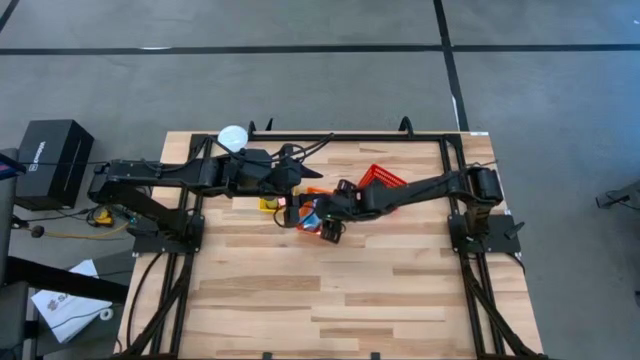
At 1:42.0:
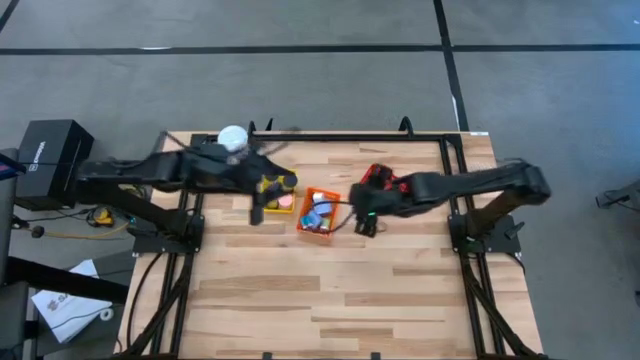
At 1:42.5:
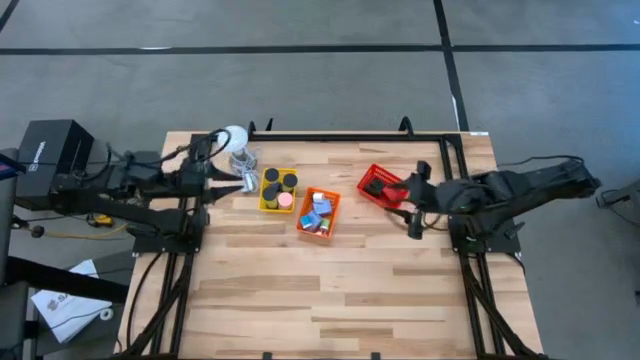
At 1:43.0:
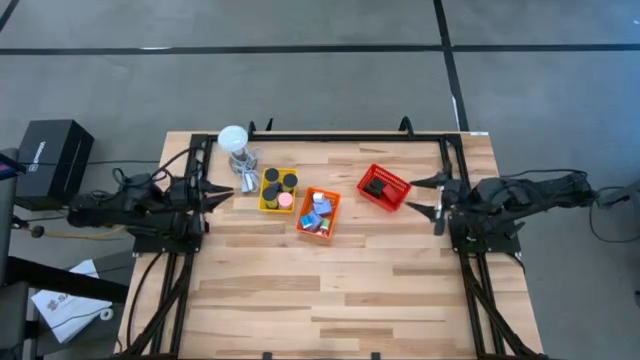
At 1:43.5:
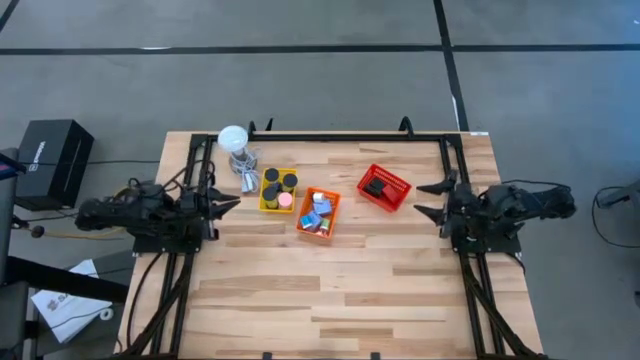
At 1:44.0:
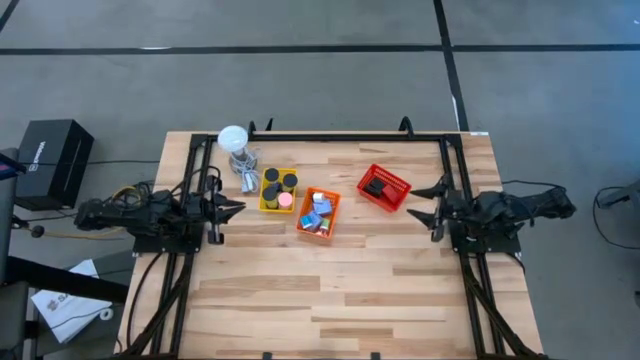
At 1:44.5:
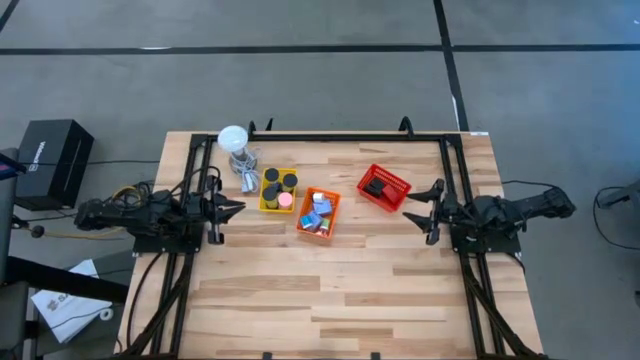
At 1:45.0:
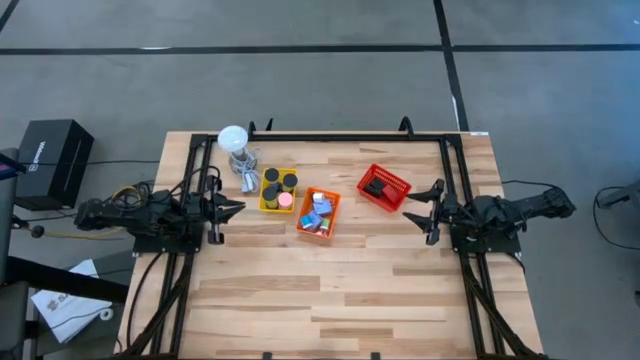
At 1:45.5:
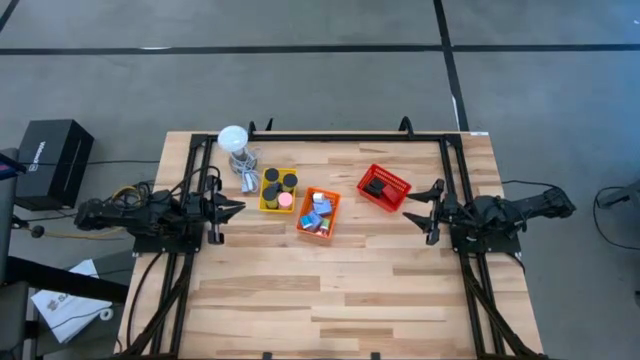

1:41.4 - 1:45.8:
Task: Pick & Place Office items
Return to Home Position

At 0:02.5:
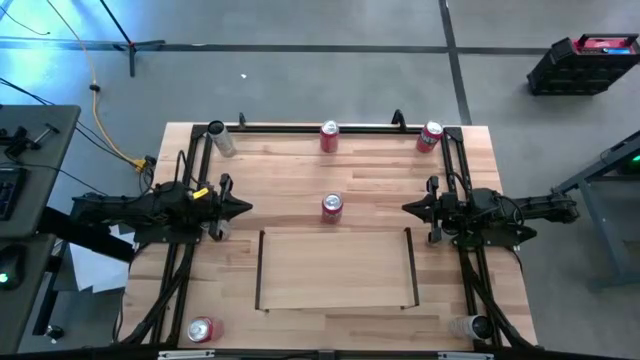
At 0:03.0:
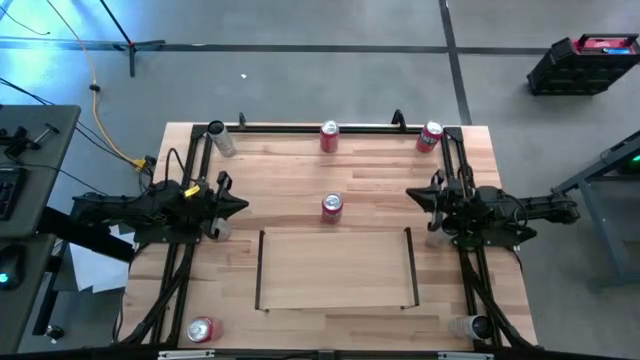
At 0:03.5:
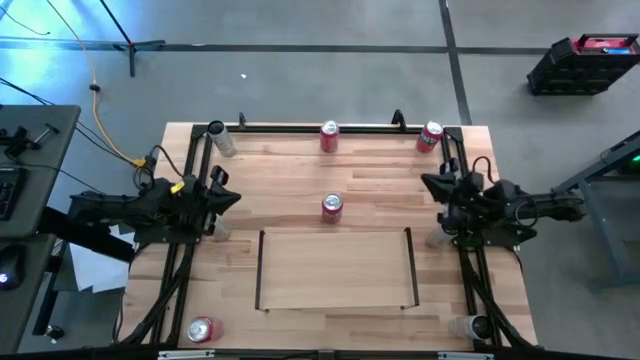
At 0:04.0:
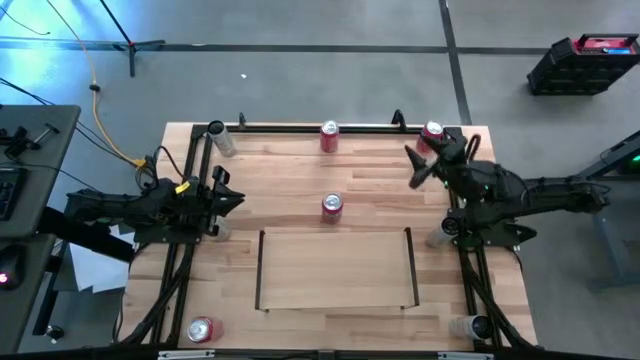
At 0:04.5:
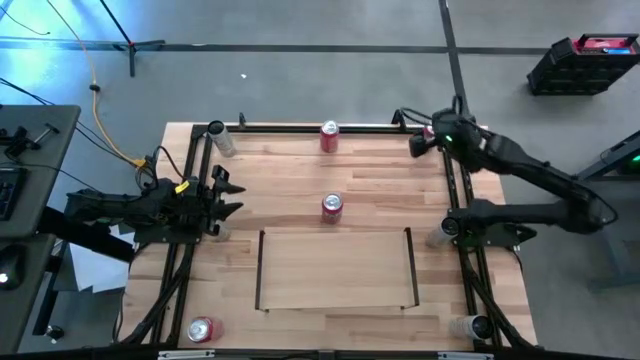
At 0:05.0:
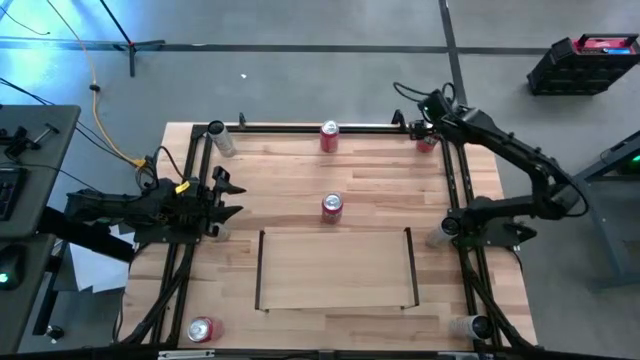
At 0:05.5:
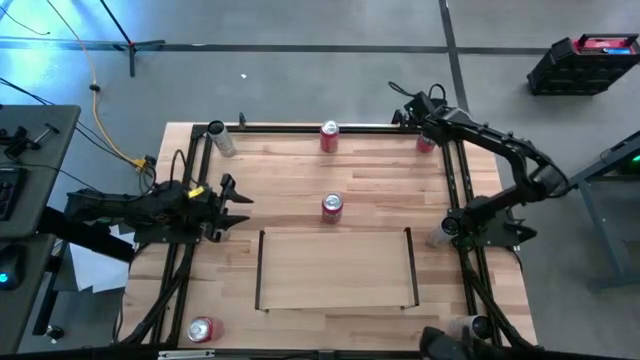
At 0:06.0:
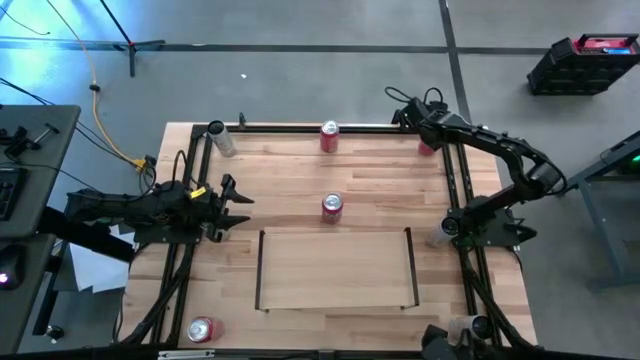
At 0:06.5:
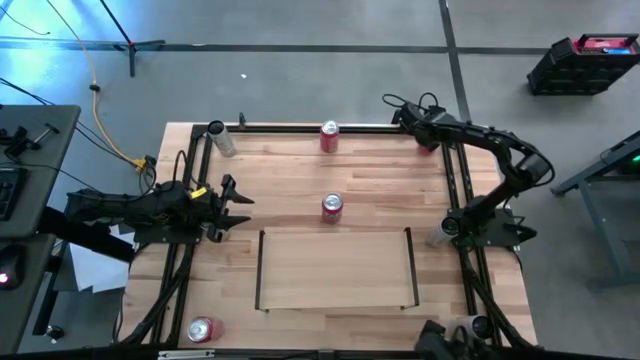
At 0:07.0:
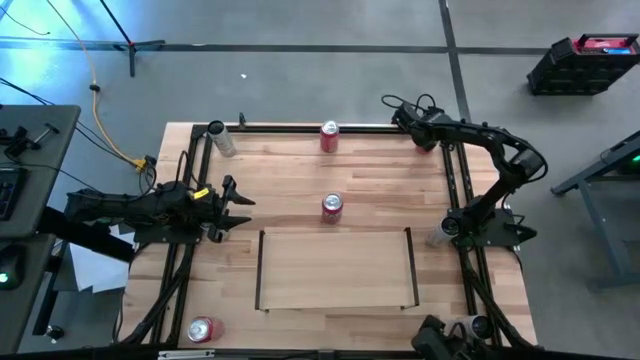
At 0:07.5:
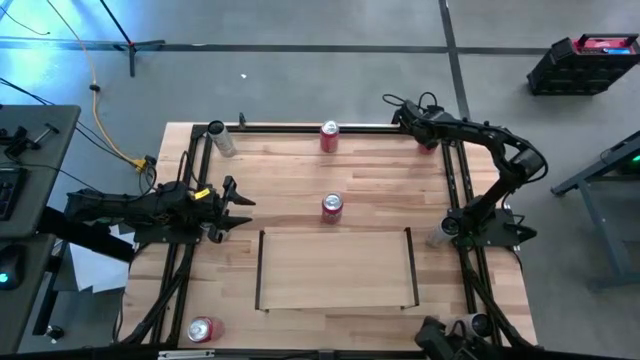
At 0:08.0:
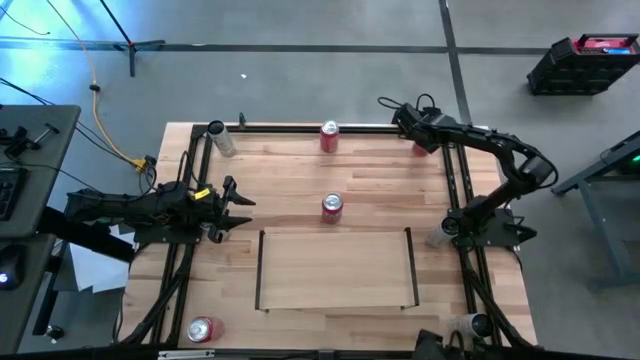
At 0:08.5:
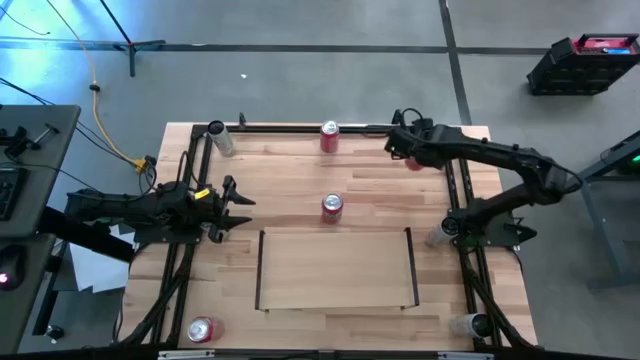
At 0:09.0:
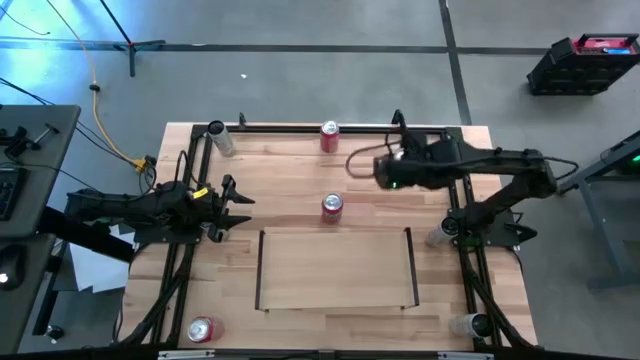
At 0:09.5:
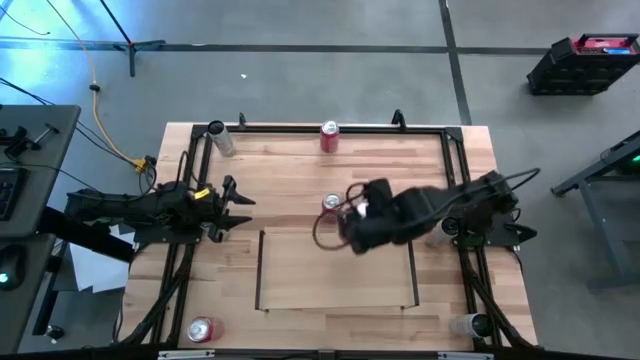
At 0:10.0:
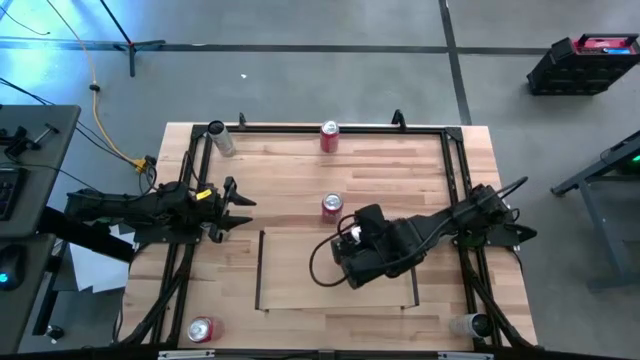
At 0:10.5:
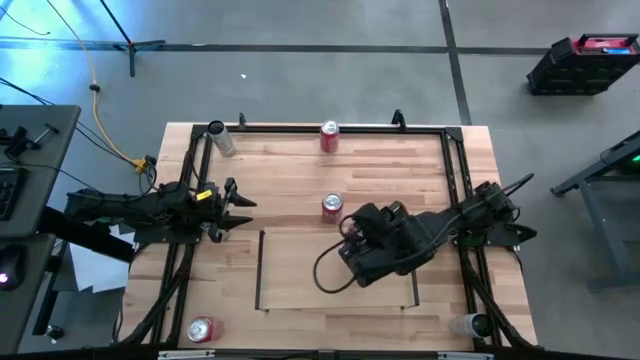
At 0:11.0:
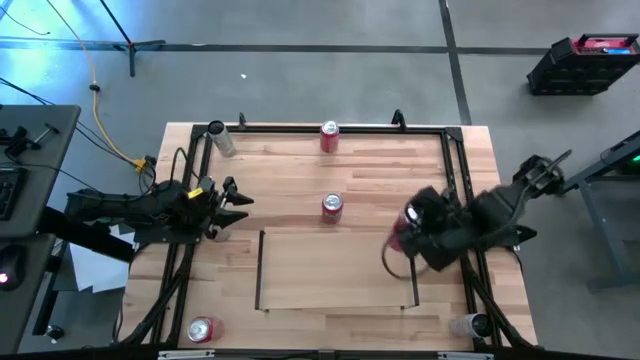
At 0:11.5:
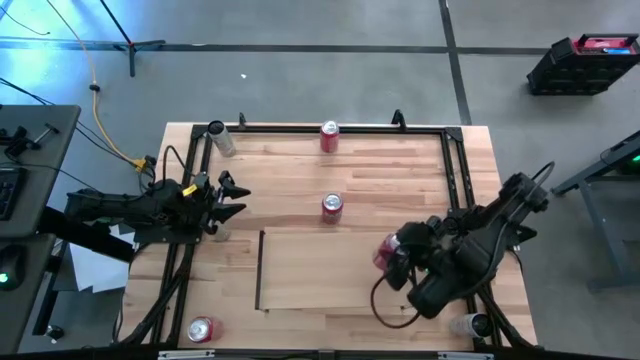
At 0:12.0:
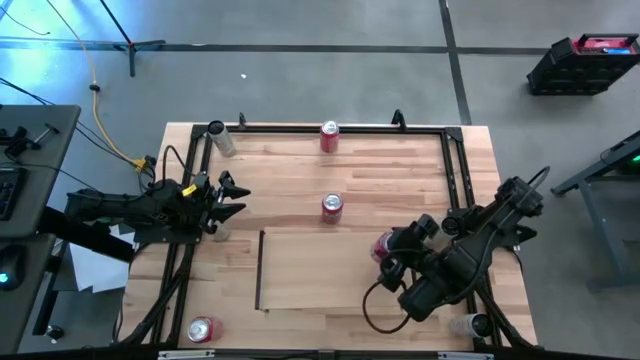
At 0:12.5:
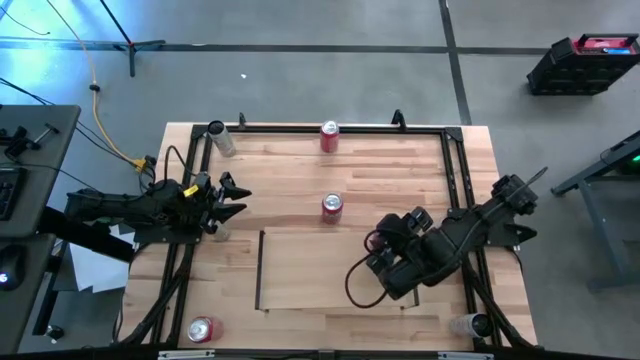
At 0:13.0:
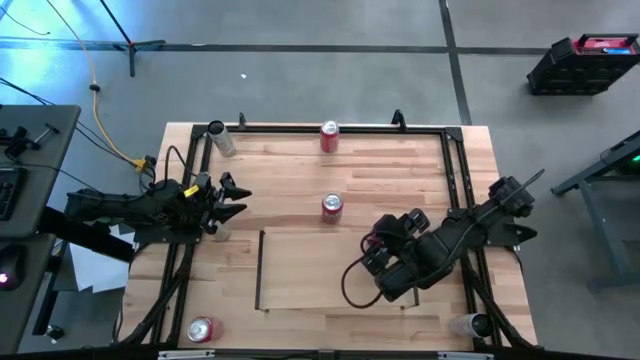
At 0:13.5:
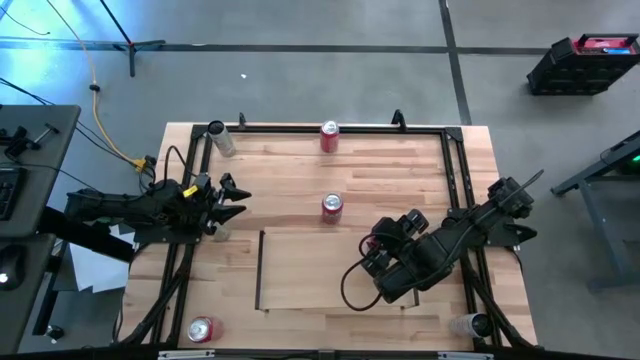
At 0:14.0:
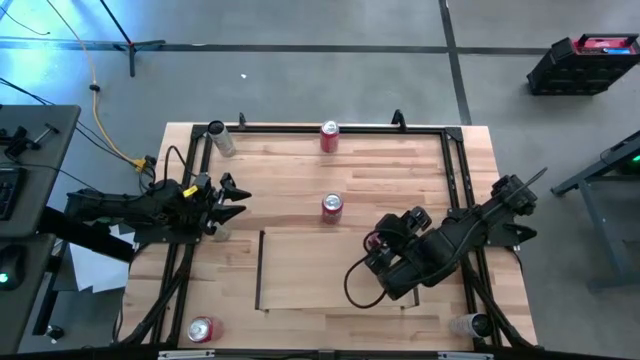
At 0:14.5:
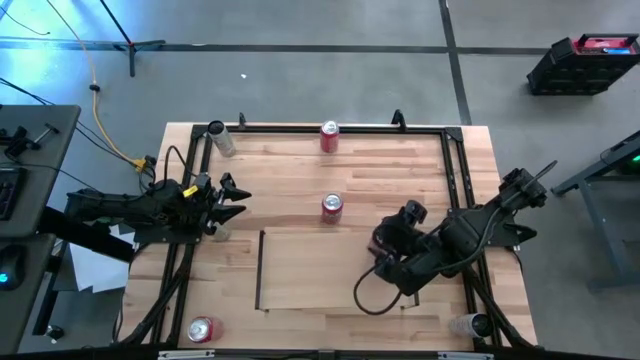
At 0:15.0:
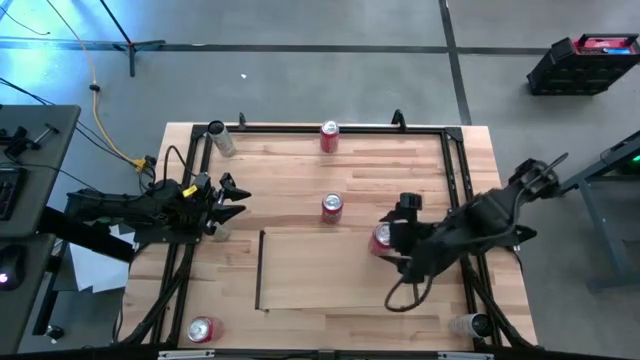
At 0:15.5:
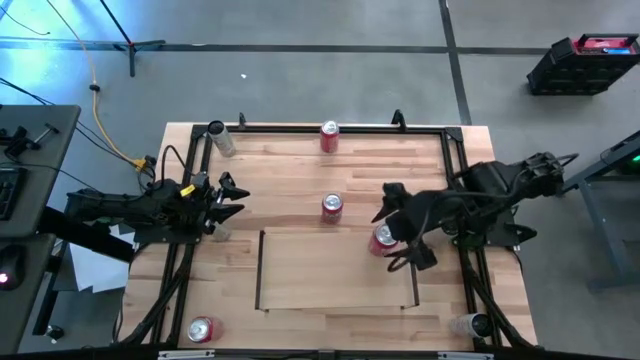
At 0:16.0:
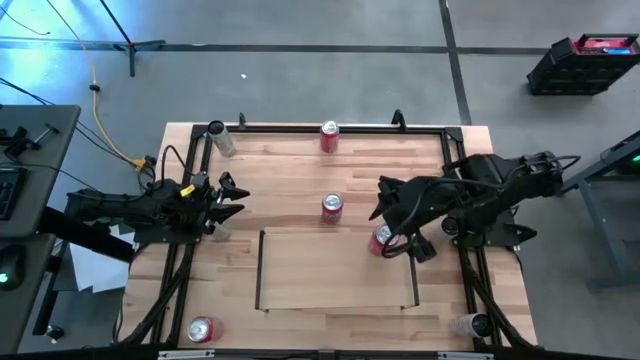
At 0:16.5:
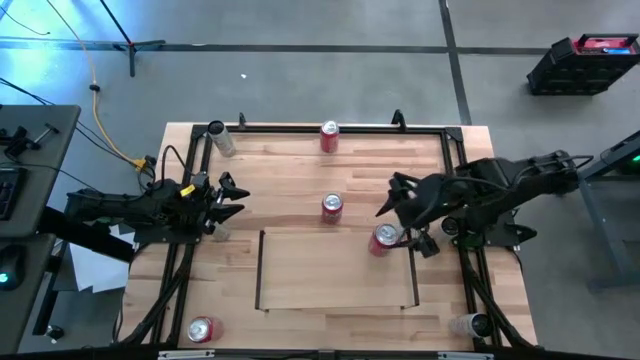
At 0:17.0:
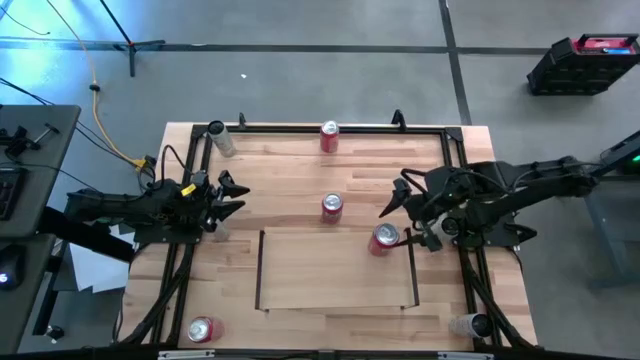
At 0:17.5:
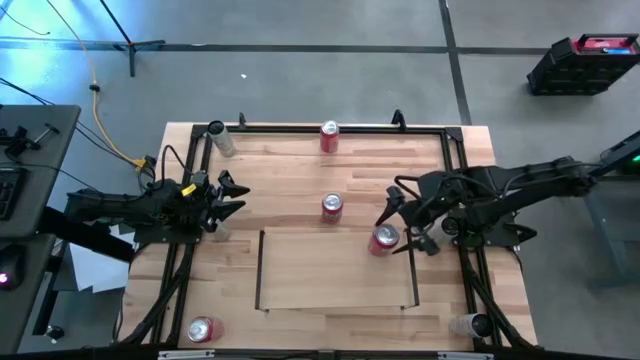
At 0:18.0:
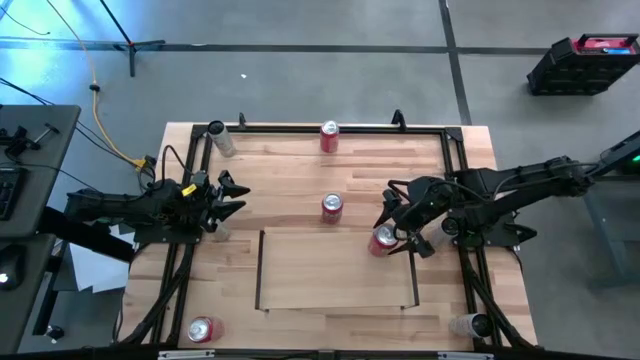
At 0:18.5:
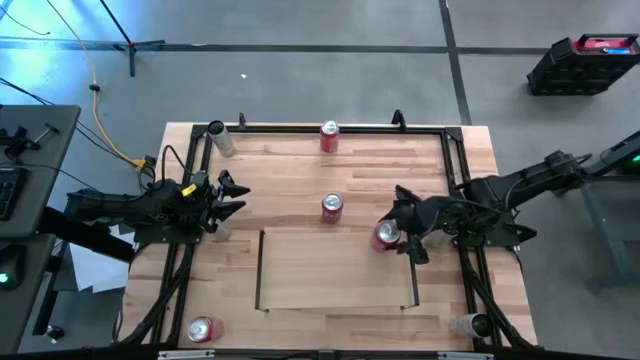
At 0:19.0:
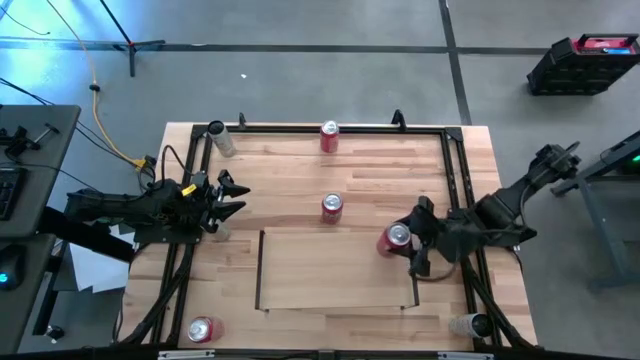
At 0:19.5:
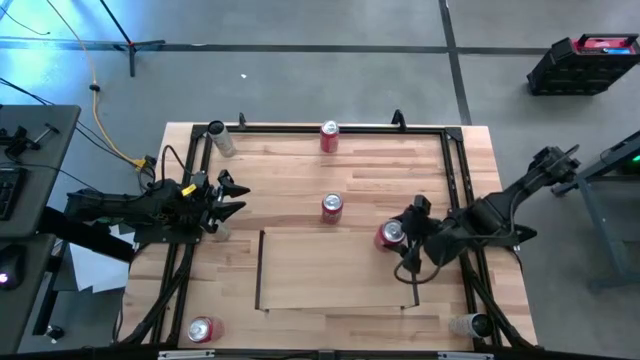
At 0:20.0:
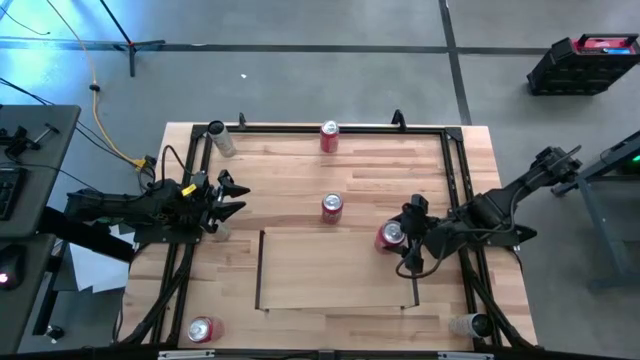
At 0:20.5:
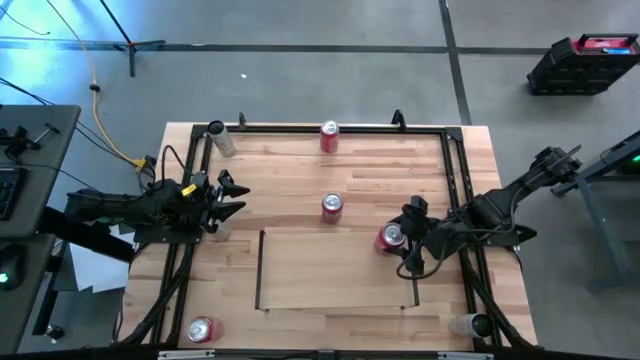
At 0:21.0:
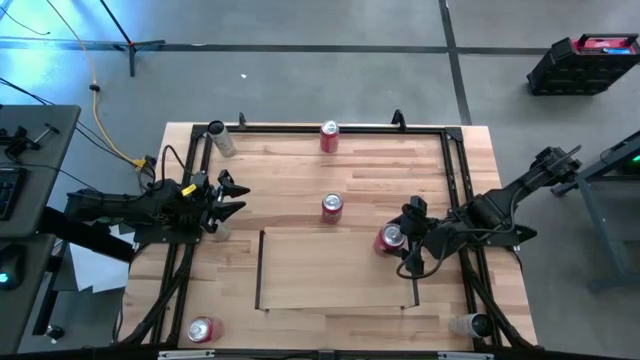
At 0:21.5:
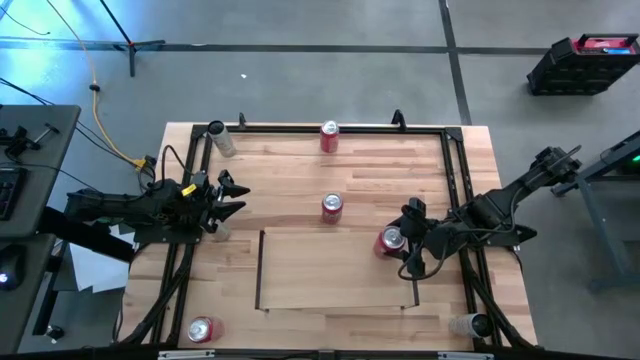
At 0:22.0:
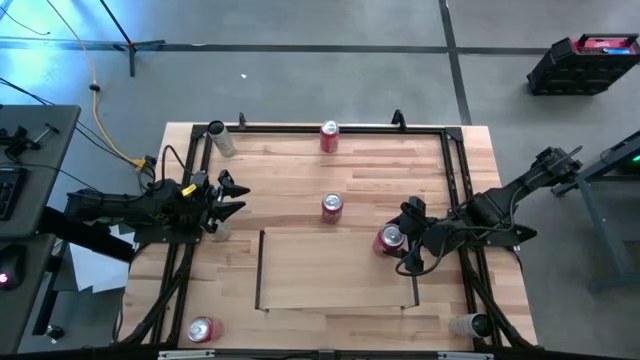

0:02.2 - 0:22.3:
Task: Place canned beverage on shelf
Put the top right red soda can on the shelf
